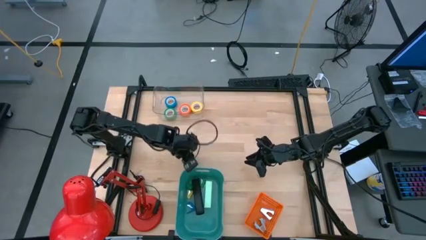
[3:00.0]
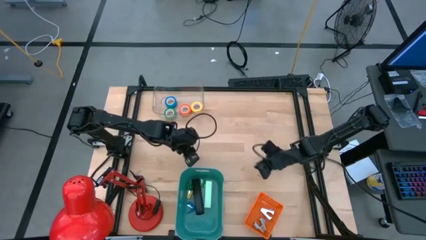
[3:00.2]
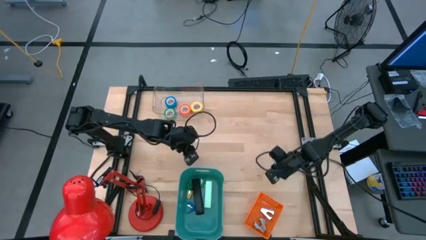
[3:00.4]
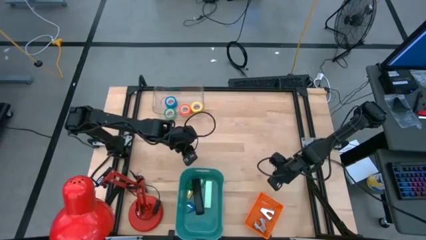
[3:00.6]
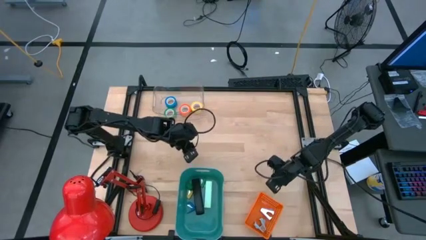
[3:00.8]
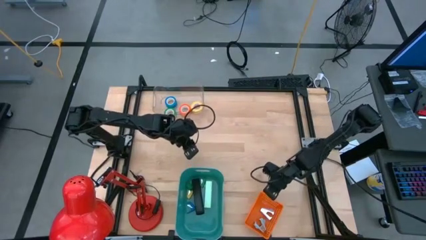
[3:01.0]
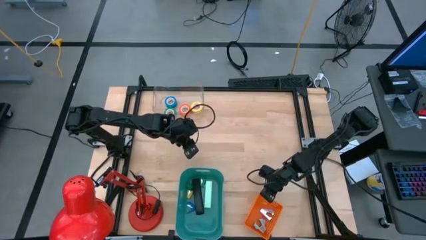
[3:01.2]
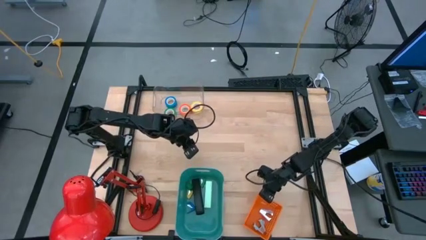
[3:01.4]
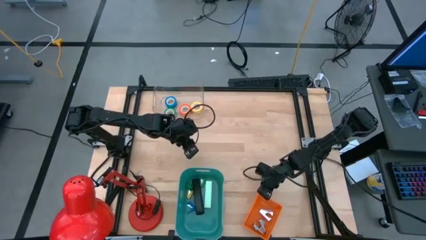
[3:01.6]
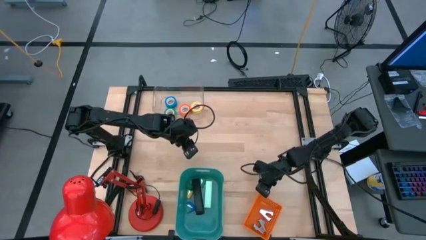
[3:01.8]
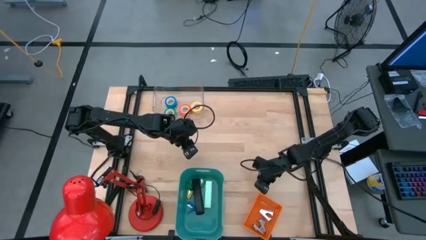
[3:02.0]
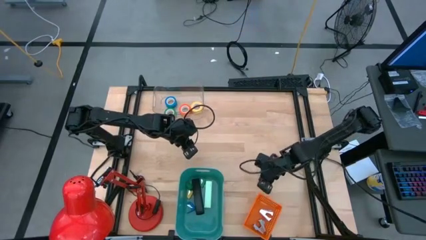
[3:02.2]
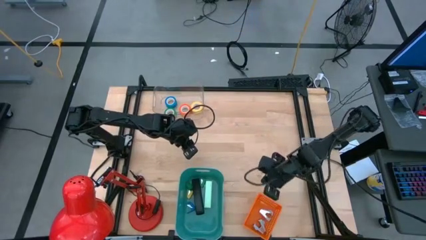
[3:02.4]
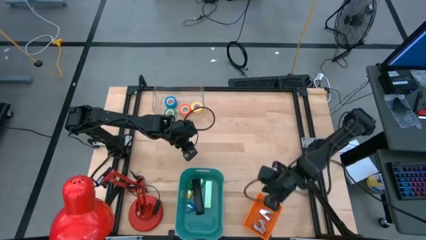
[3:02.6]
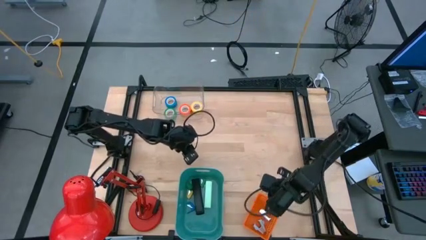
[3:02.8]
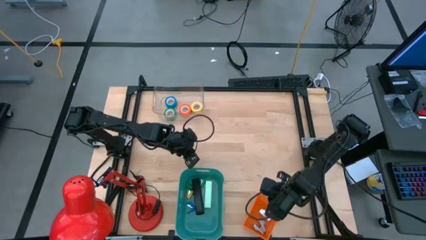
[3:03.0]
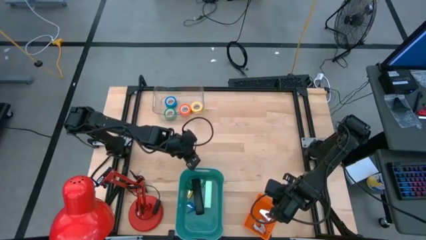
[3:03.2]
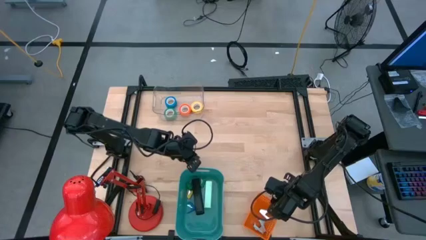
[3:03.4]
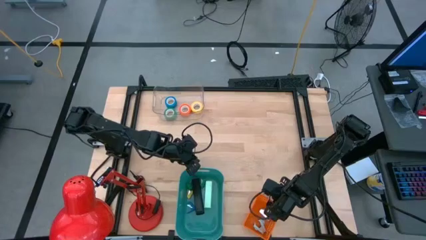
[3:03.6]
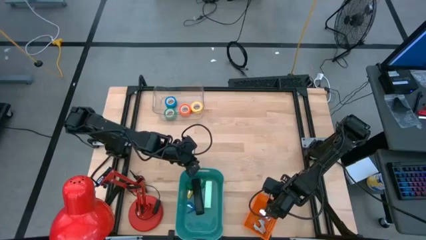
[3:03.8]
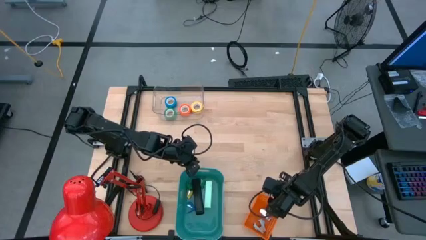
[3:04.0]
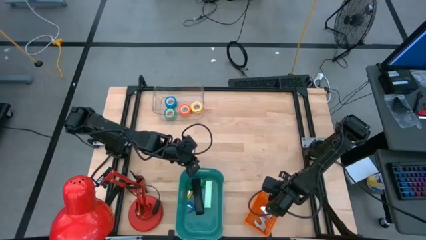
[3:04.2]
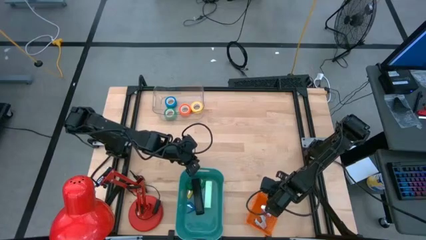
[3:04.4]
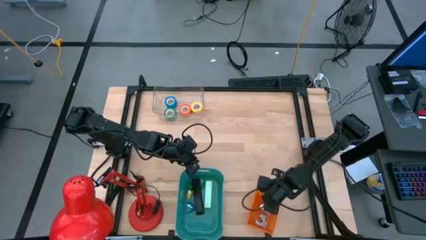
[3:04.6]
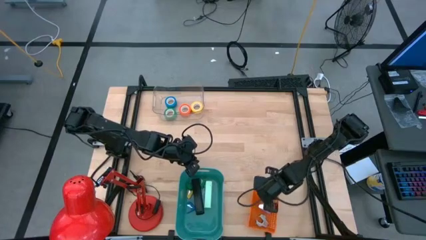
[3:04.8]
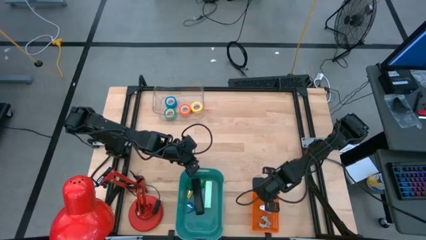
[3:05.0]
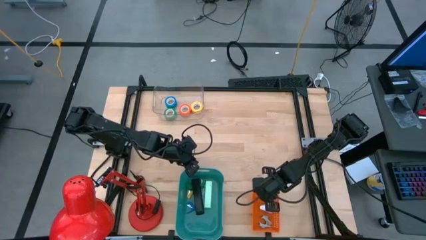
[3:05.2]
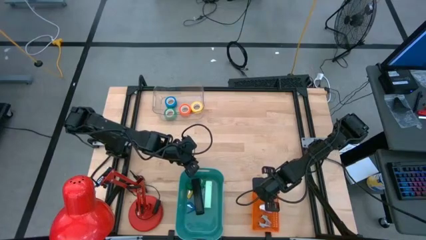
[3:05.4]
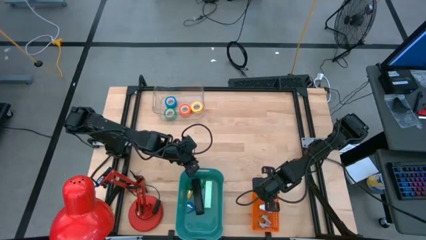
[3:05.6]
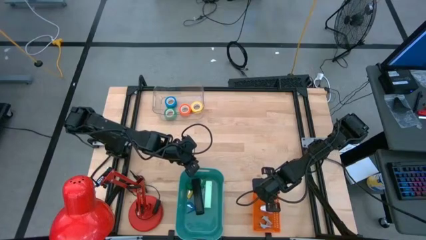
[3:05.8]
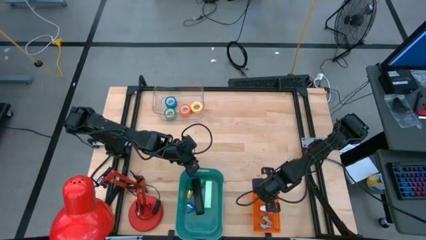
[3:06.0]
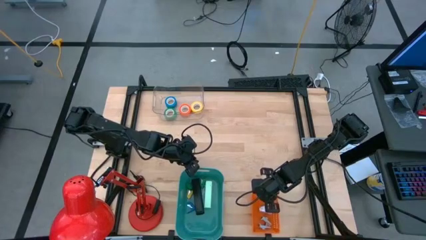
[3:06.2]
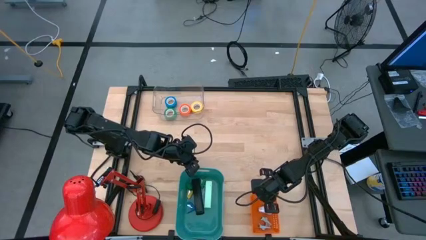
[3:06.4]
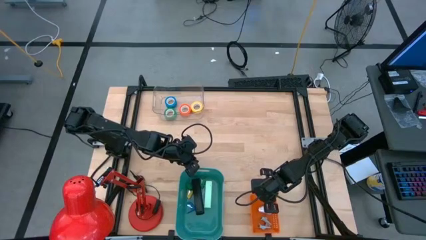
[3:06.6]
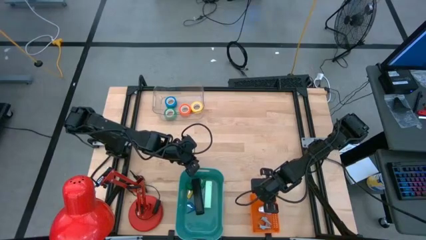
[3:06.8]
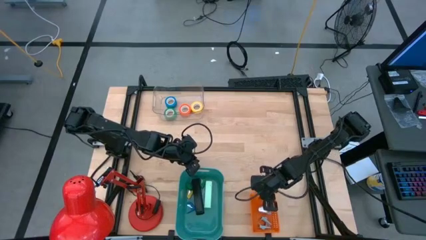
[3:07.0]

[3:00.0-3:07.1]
Task: Pick and place Stapler, Stapler remover, tape
Adjust the orange bin

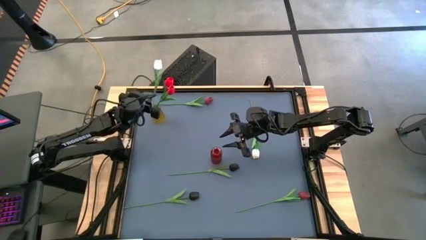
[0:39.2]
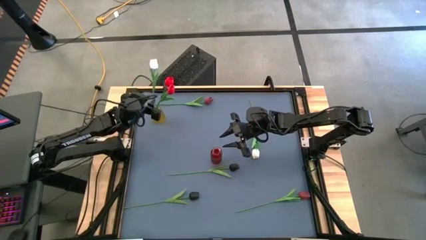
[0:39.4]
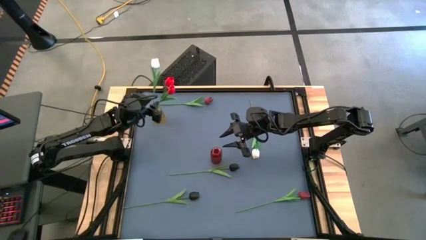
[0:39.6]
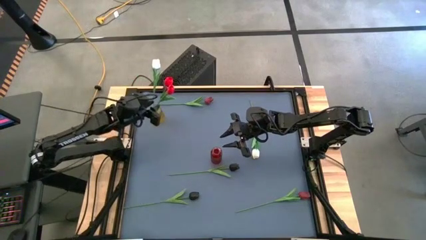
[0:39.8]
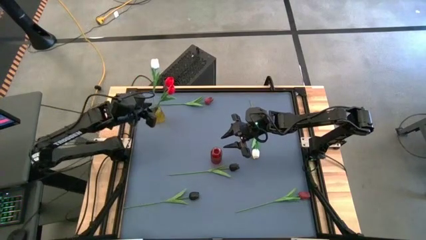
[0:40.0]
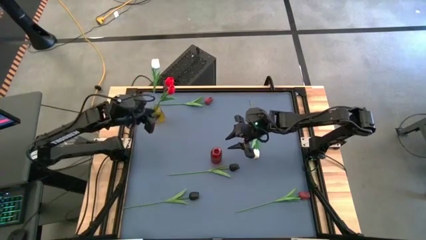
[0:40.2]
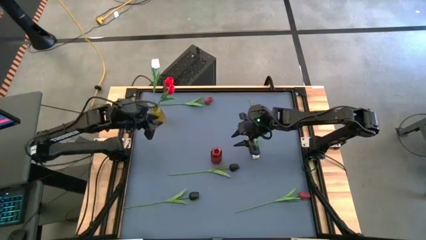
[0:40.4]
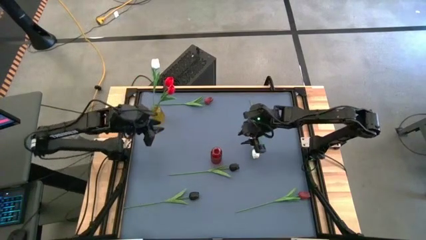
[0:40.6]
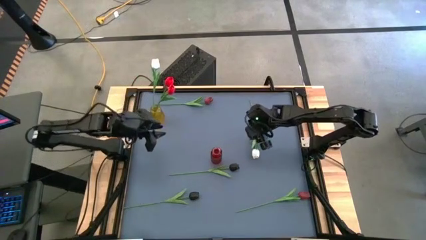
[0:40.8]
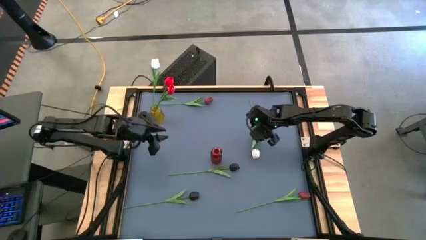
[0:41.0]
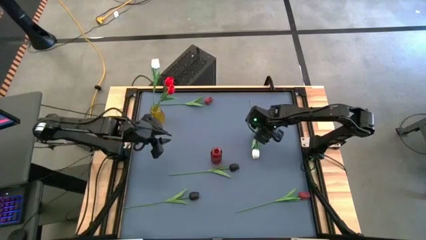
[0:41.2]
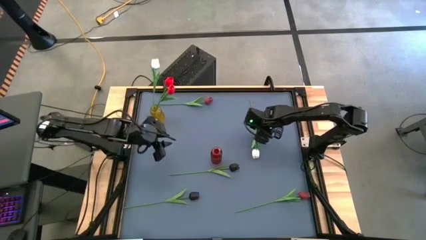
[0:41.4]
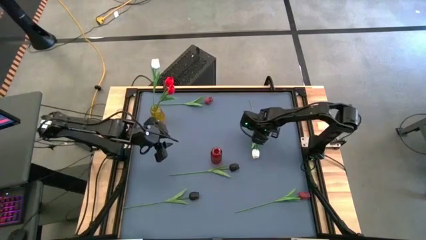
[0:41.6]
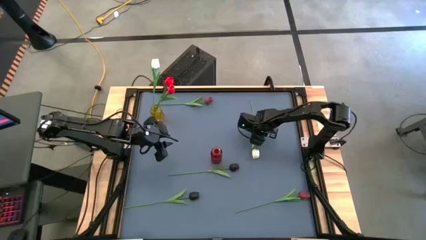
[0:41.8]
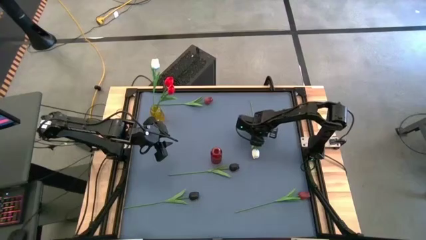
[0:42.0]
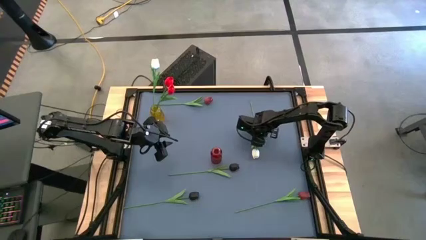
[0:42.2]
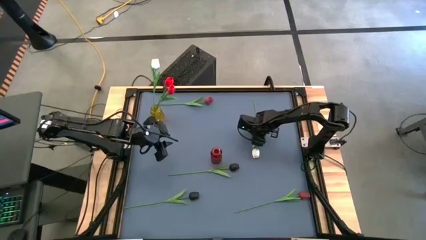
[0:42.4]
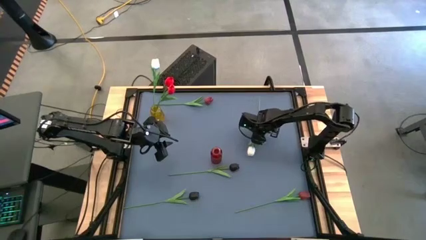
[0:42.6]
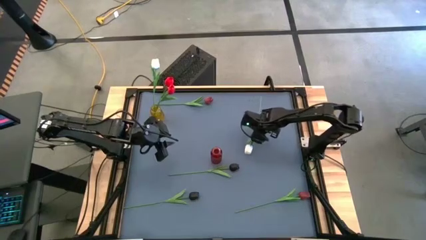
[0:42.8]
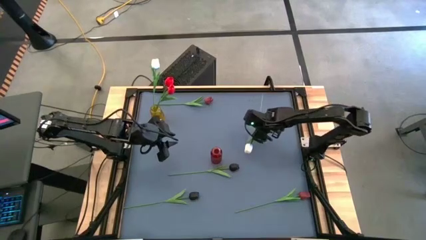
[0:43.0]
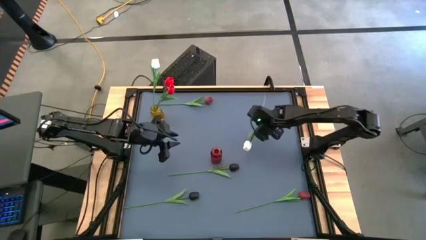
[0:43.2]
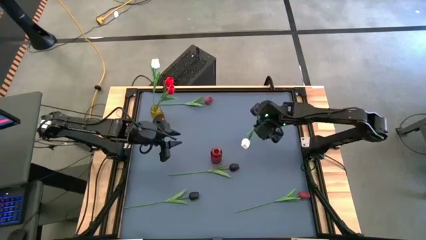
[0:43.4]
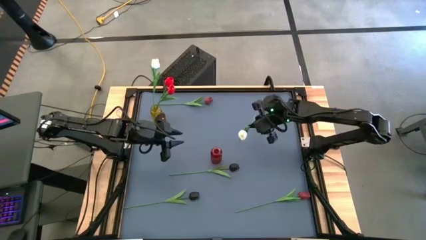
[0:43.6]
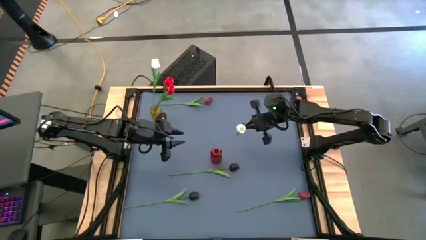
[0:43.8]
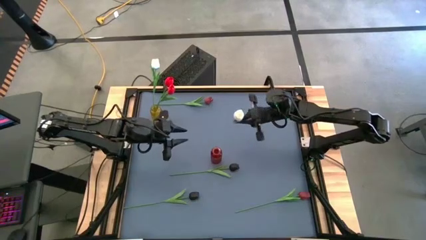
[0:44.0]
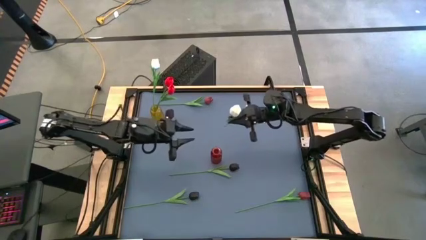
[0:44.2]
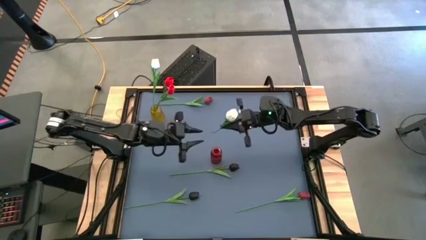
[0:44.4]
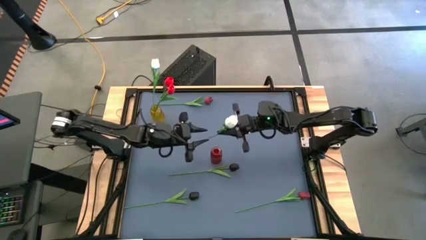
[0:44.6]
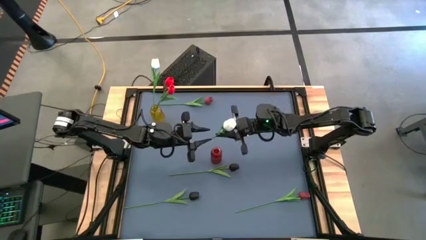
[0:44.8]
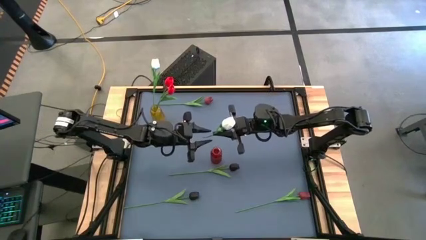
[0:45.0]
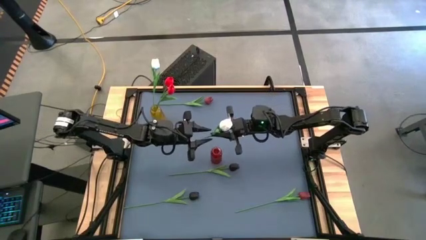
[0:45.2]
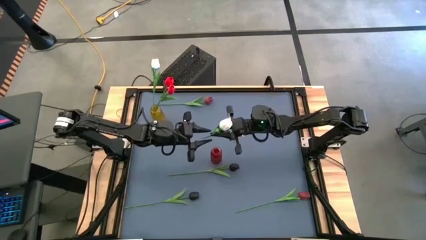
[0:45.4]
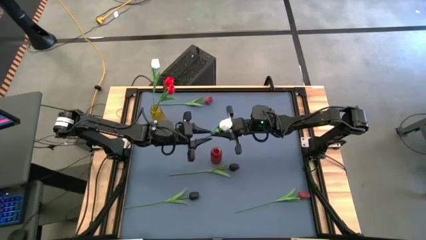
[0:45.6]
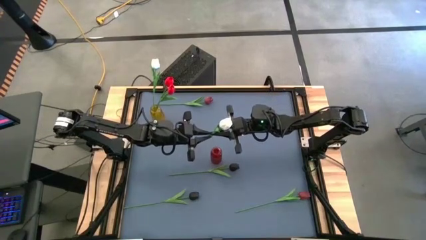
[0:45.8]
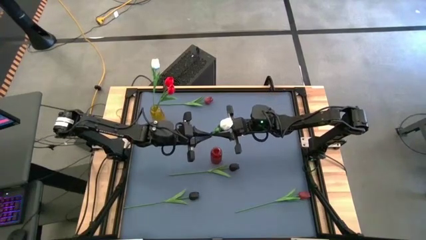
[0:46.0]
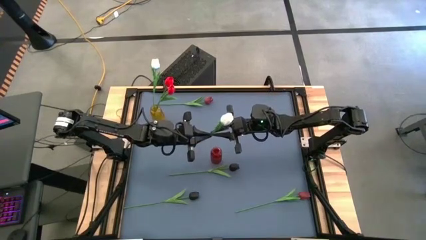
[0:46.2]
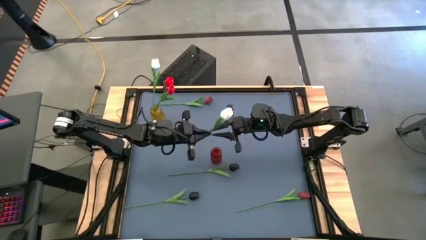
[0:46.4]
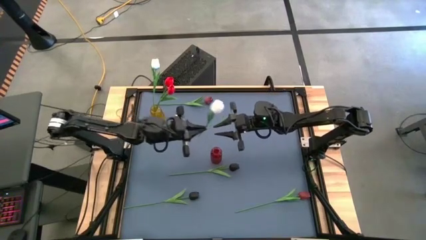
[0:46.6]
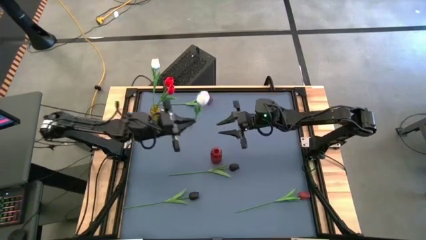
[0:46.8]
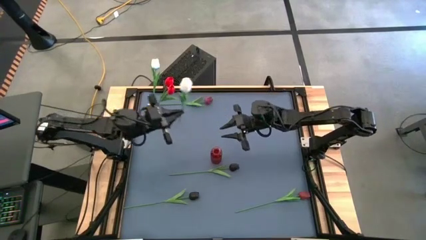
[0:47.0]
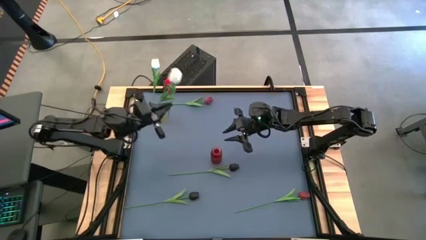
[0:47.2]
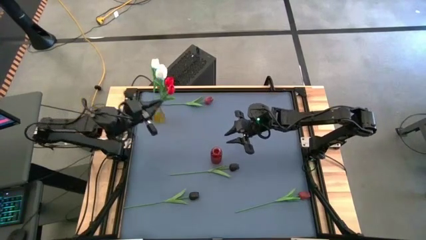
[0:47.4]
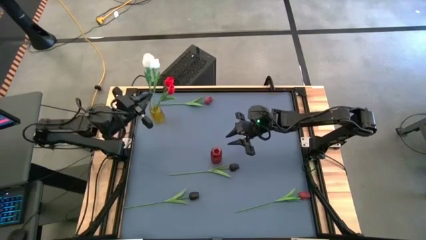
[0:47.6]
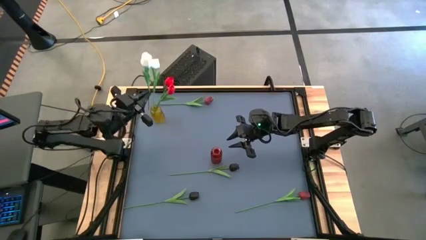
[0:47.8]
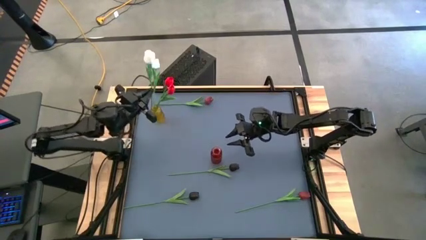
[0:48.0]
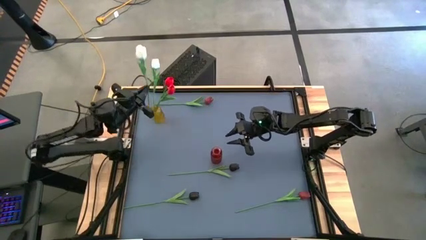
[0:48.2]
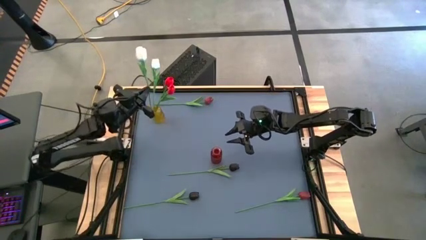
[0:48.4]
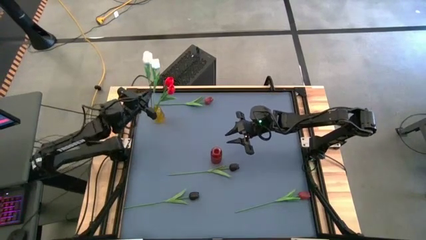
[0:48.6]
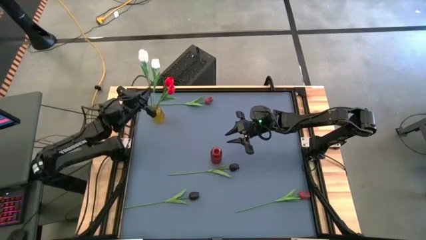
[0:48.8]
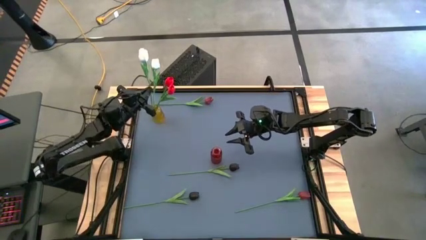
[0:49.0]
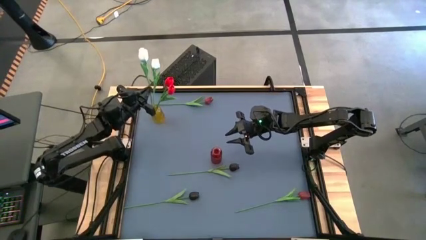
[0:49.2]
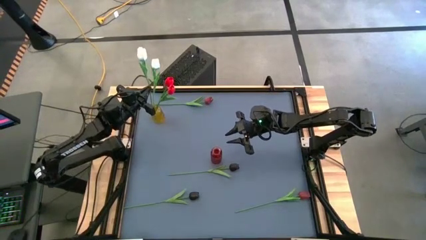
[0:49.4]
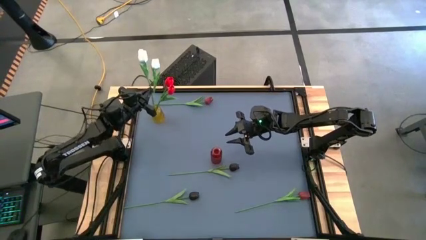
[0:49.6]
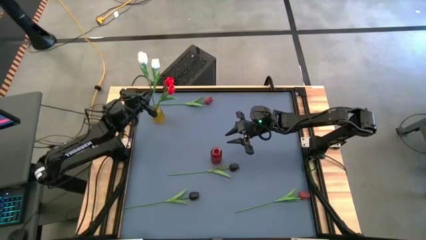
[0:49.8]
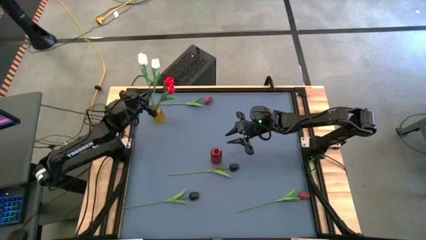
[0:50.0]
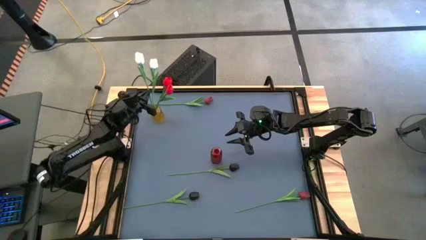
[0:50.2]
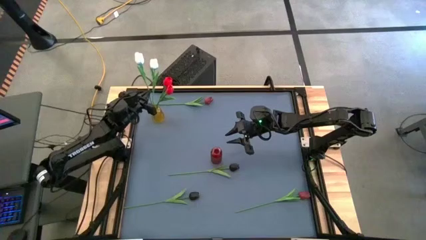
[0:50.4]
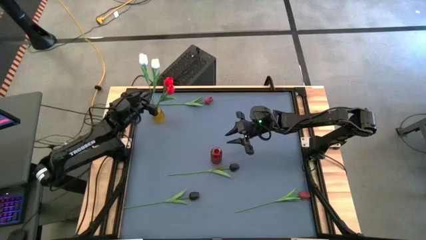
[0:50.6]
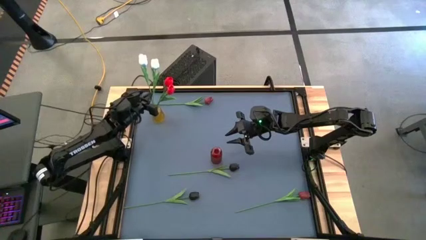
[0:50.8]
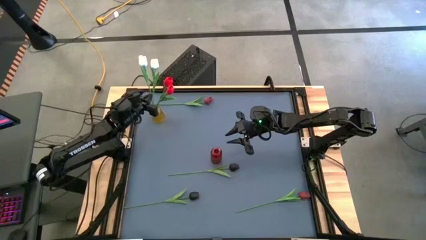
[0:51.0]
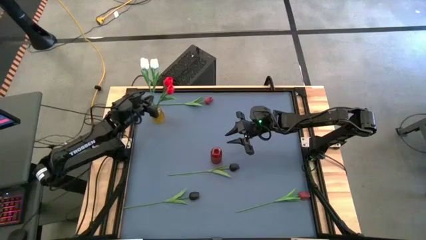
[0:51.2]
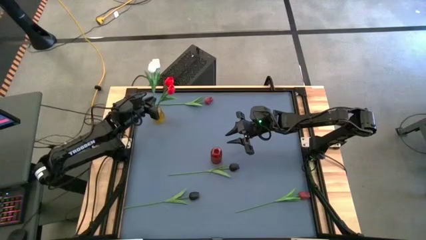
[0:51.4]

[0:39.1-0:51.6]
Task: Sort flowers into vase by color
Put the black tulip into the yellow vase
